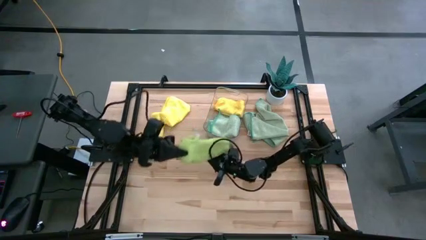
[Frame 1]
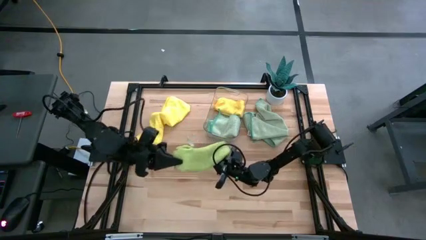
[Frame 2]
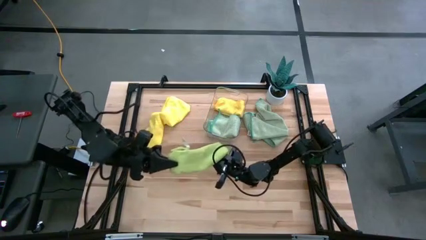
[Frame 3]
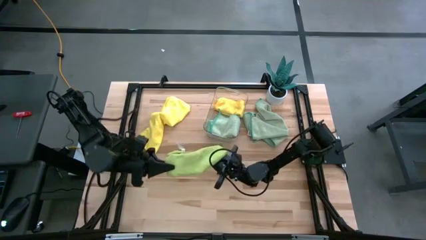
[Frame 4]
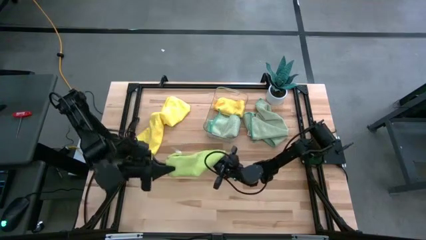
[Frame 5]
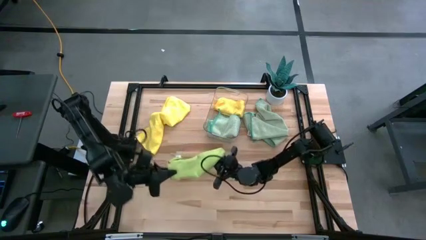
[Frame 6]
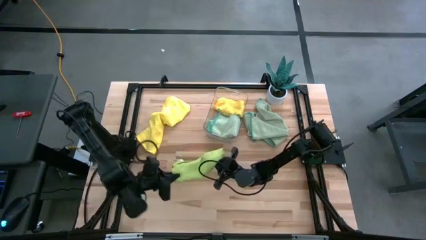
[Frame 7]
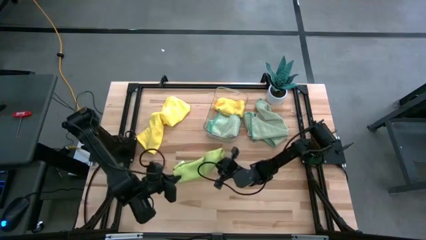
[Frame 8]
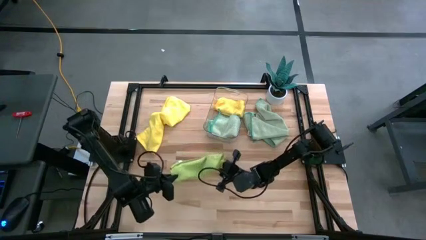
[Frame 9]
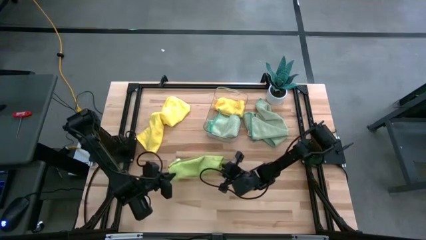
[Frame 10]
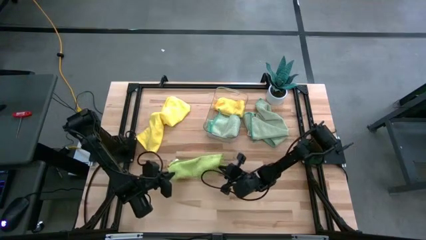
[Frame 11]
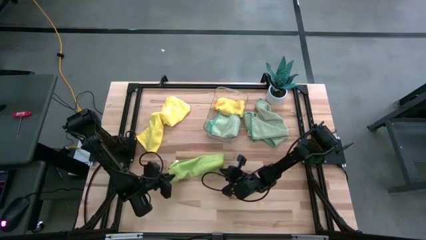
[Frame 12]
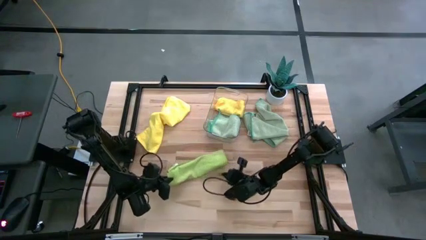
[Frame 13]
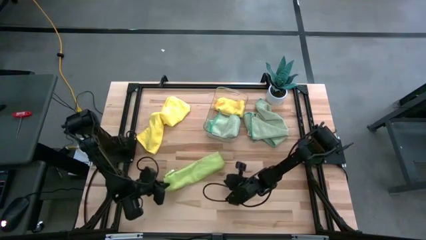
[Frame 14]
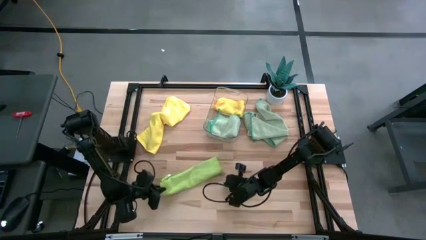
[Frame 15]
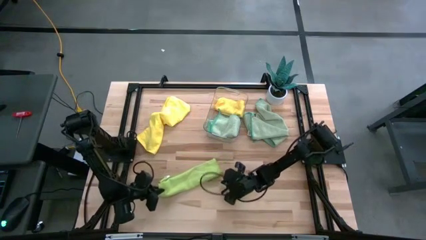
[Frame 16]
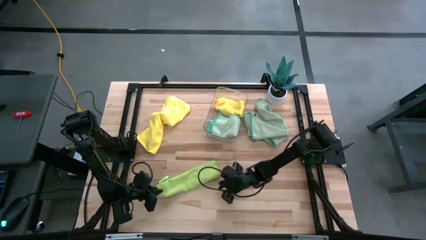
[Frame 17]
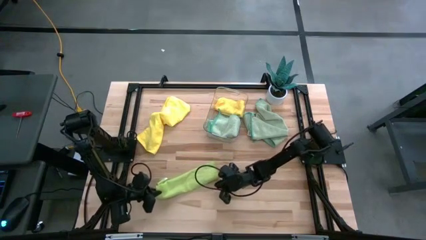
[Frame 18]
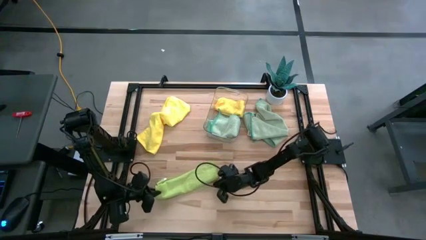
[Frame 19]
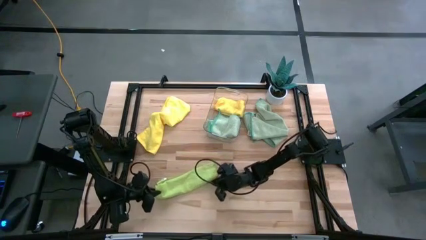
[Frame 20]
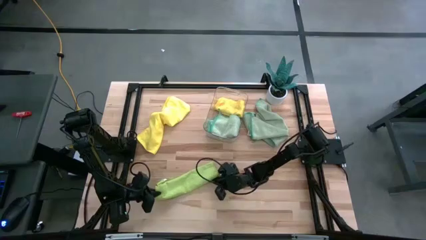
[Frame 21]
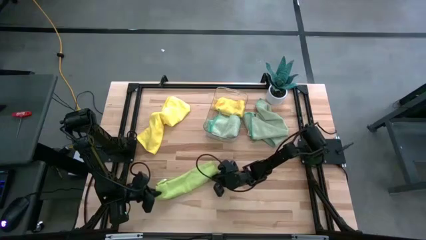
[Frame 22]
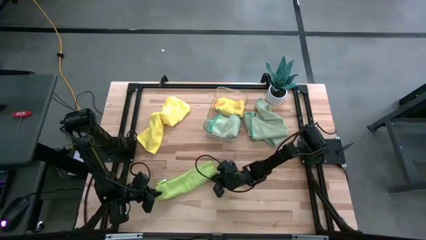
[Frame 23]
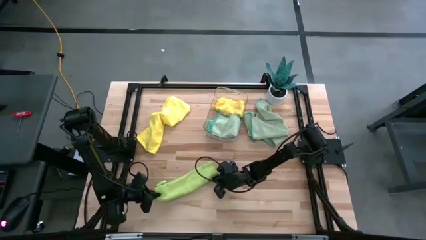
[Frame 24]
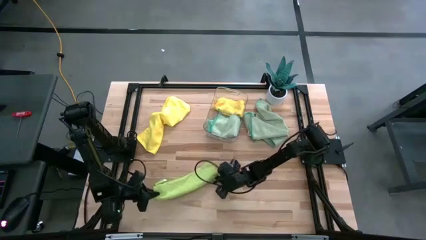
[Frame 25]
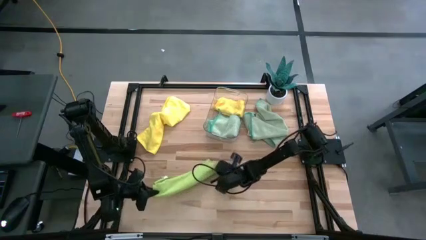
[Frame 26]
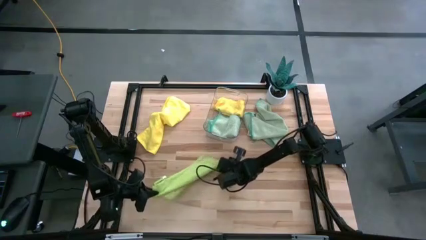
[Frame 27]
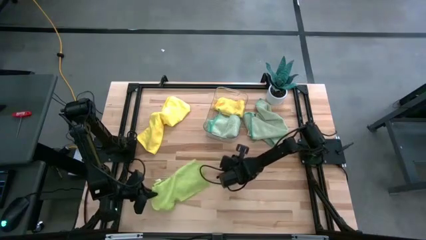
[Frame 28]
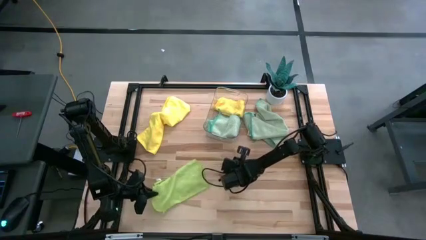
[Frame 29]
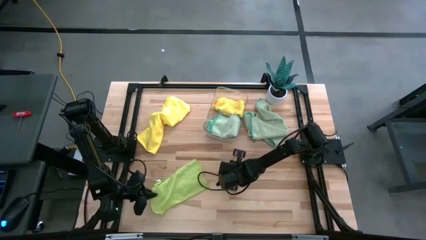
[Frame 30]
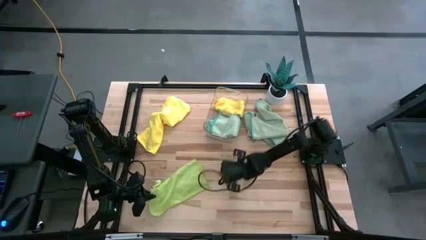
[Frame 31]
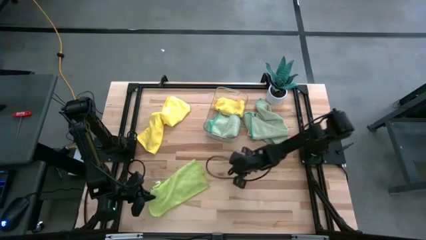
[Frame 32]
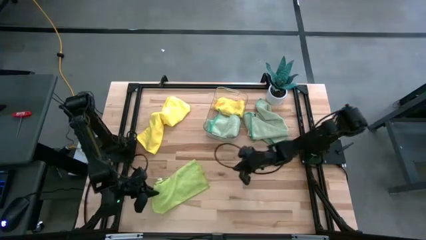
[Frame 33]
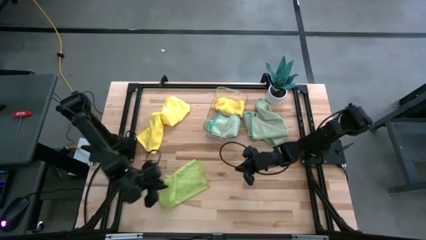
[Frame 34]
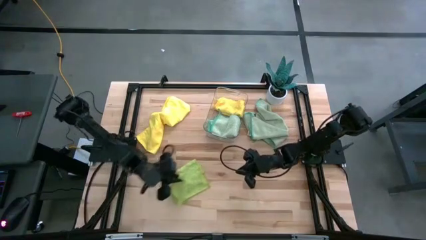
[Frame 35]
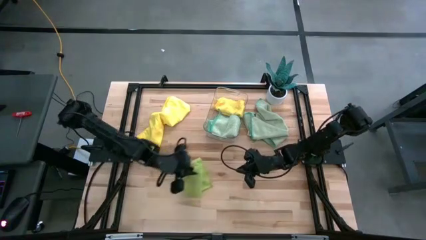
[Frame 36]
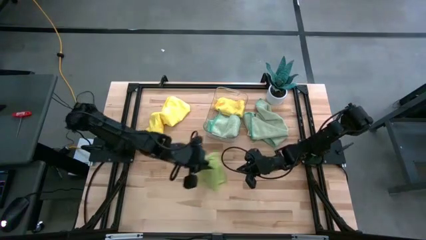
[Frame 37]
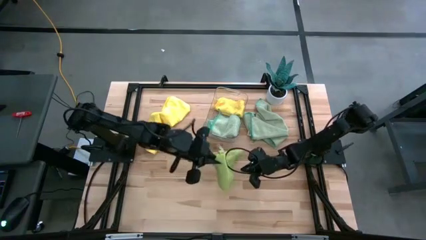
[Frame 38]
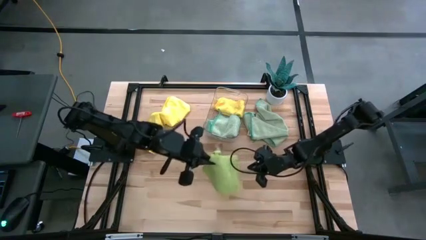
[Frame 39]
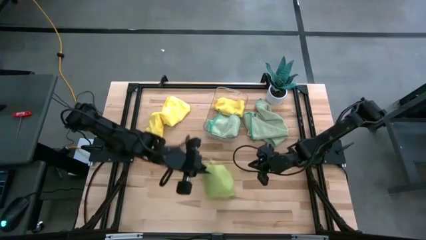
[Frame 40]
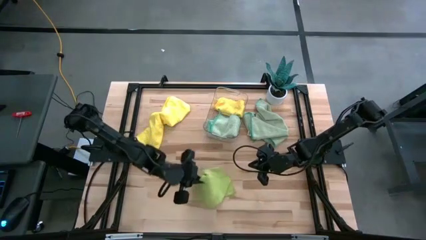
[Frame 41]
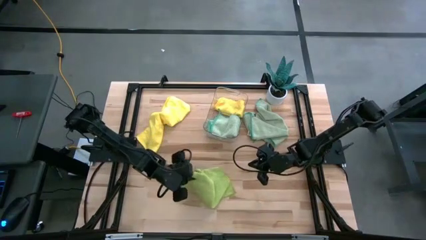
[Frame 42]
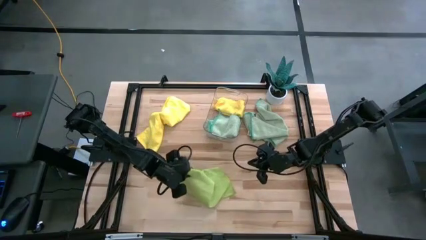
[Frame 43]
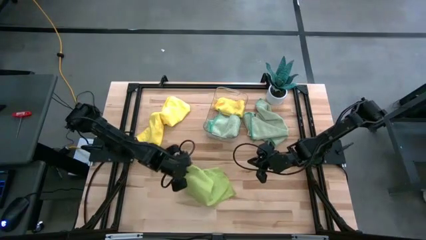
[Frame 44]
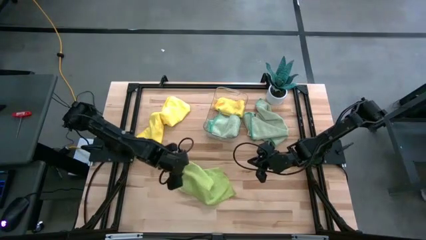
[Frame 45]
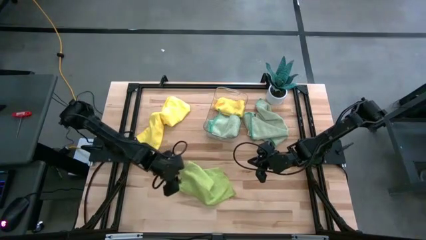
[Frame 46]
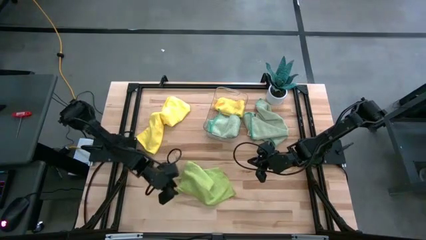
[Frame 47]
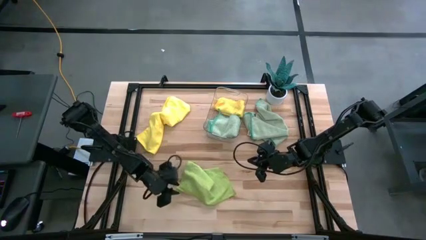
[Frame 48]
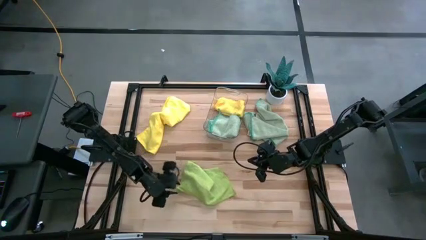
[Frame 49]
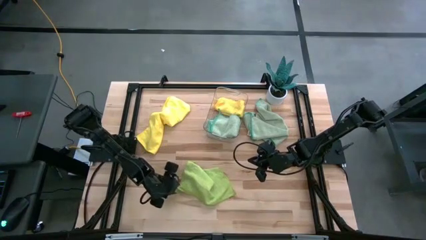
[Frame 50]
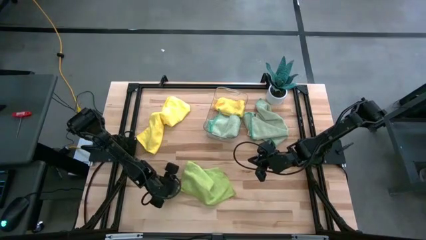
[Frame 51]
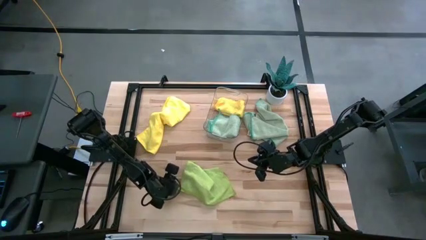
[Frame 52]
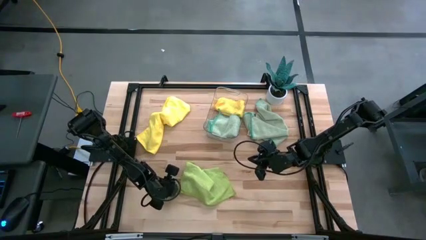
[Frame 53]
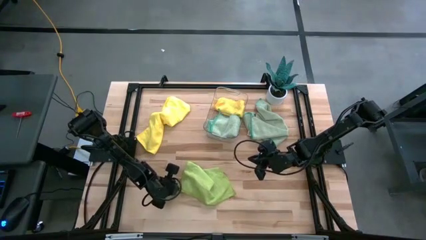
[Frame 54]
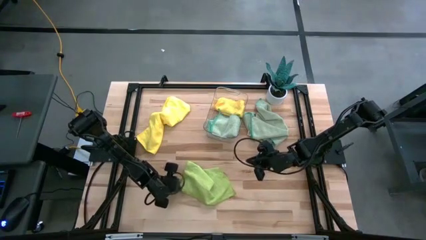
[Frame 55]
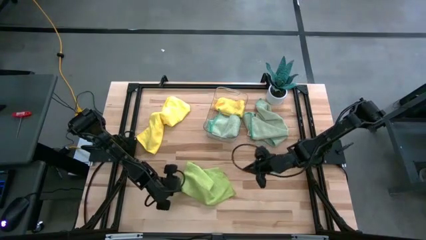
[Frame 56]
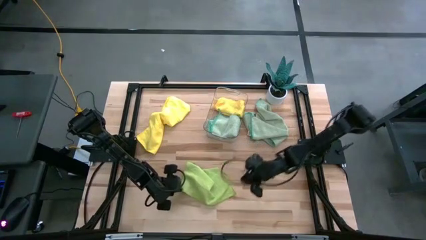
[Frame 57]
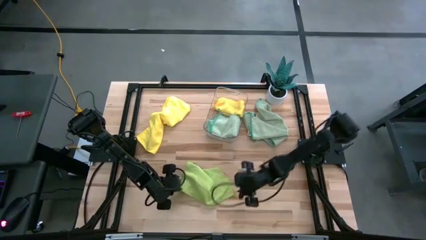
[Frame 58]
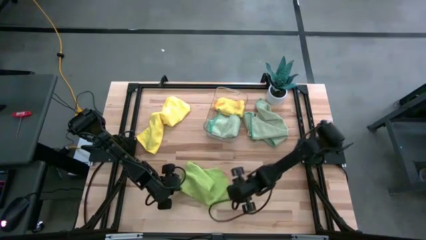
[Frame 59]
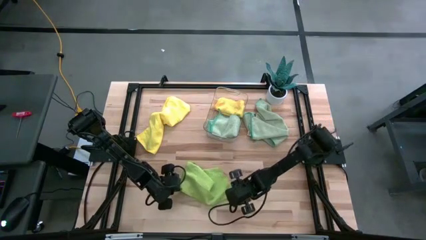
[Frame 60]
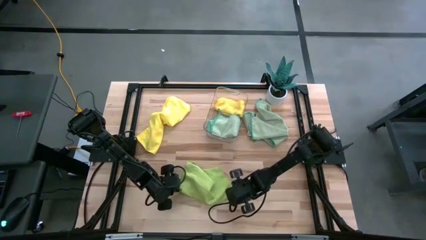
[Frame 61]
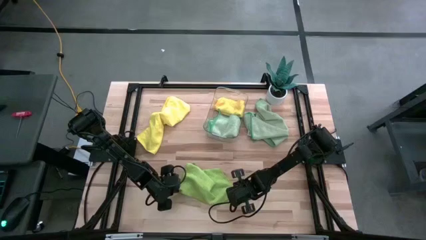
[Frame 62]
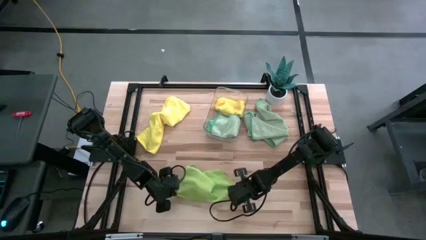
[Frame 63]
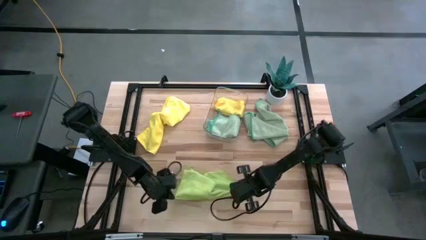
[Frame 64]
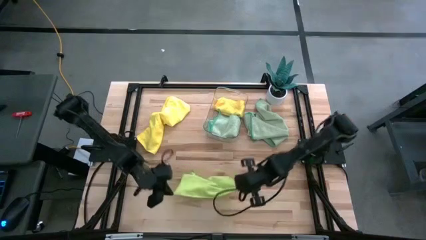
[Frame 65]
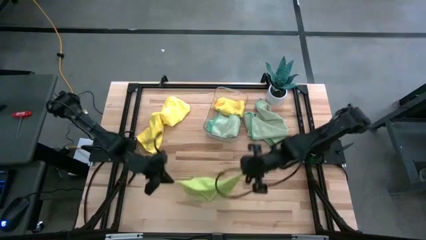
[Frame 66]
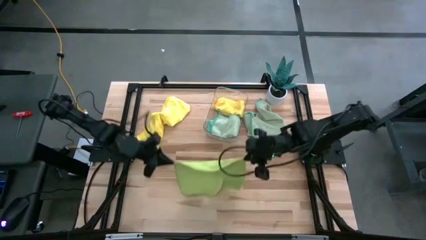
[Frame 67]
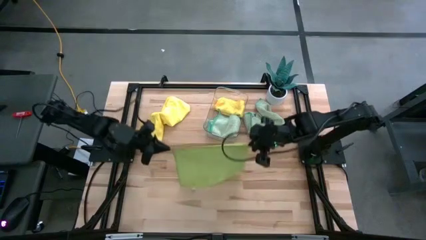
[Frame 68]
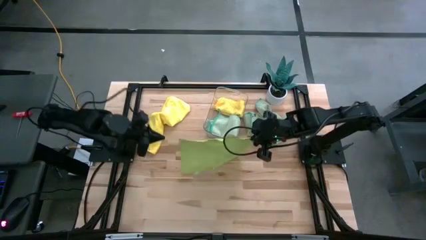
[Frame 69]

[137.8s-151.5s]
Task: Fold microfiber towels
Fold the green towel

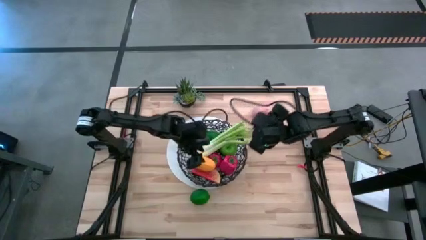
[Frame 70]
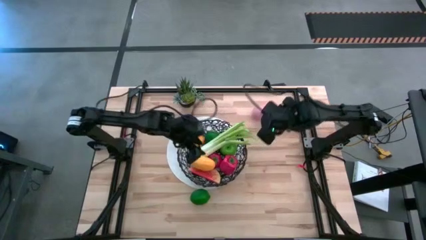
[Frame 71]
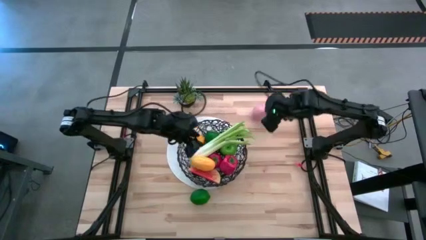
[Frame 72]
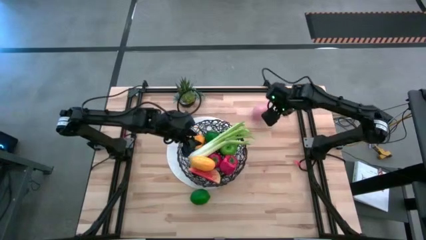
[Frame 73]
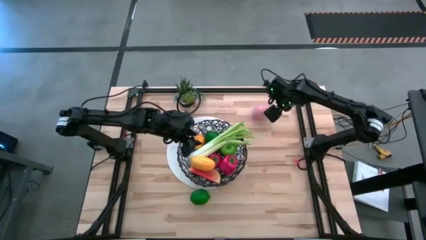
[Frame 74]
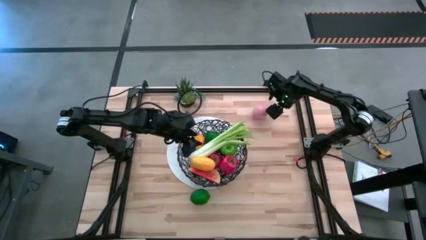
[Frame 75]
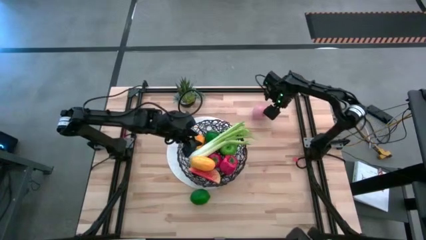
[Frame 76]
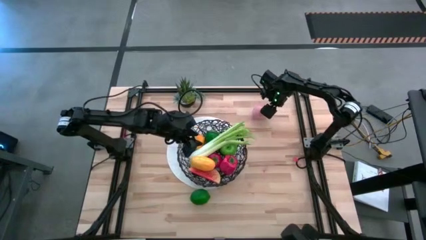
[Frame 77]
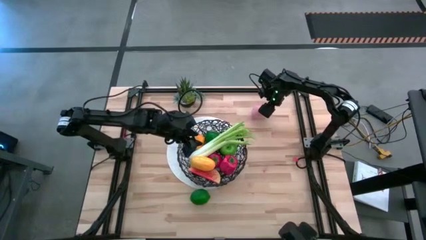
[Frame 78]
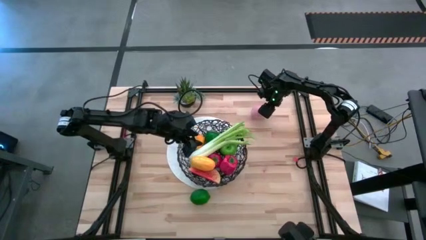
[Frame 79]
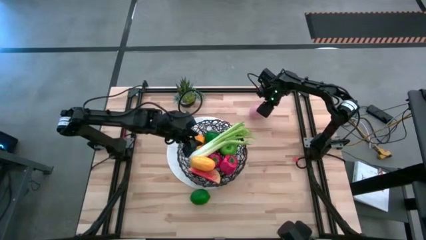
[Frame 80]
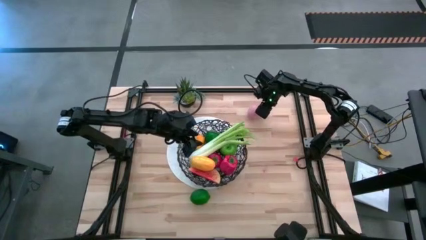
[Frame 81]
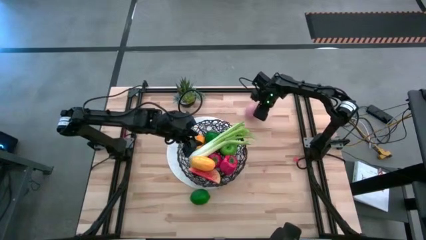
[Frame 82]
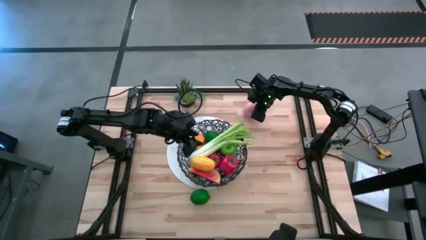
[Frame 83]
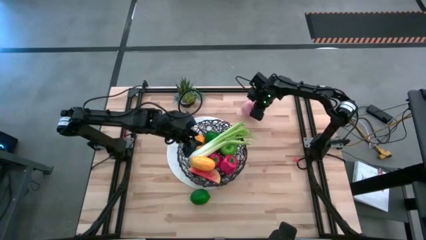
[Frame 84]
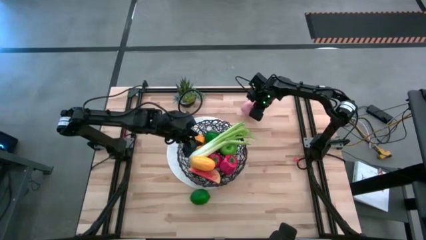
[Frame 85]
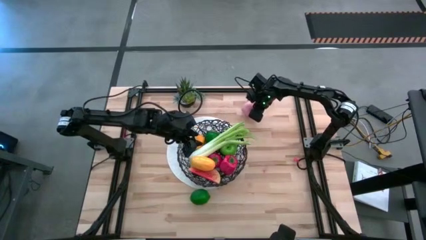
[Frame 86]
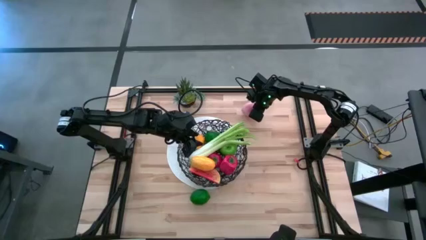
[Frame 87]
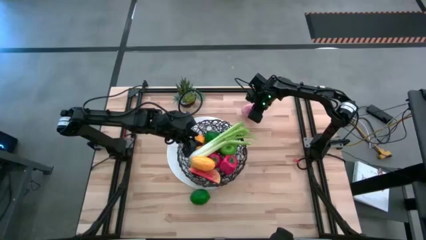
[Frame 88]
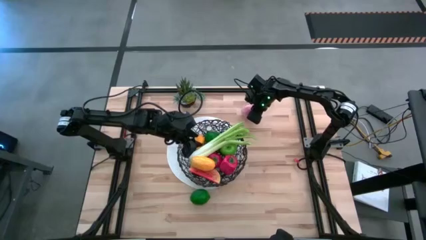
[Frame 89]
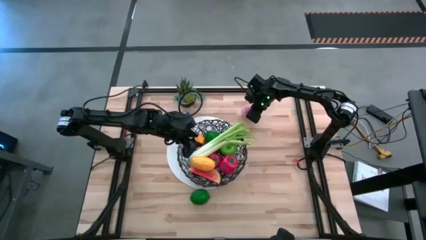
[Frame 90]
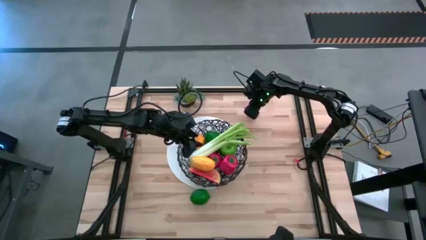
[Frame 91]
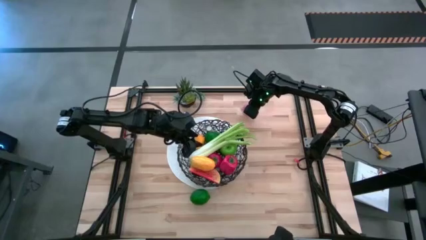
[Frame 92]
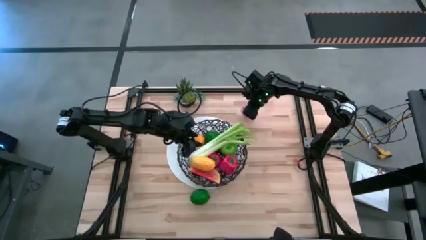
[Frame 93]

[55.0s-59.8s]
Task: Build produce basket
Put the pink peach into the wire basket
